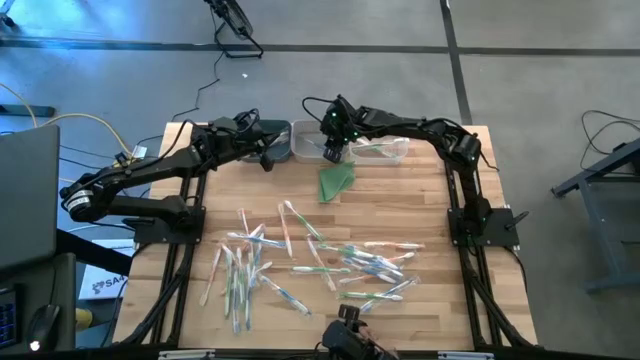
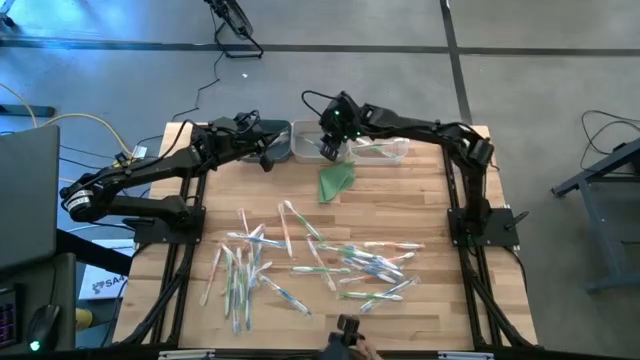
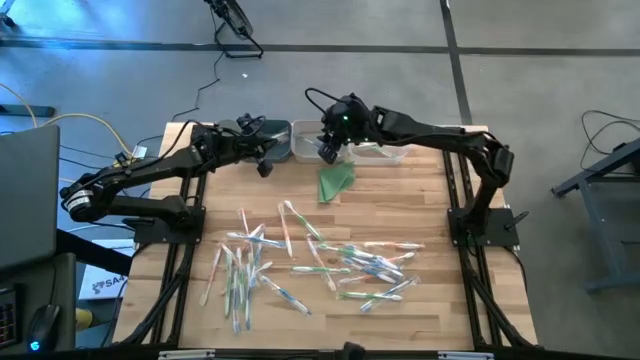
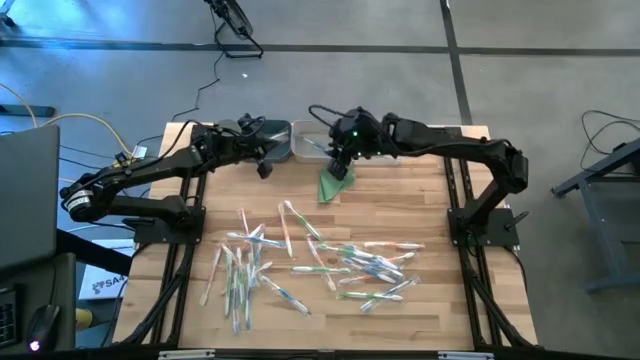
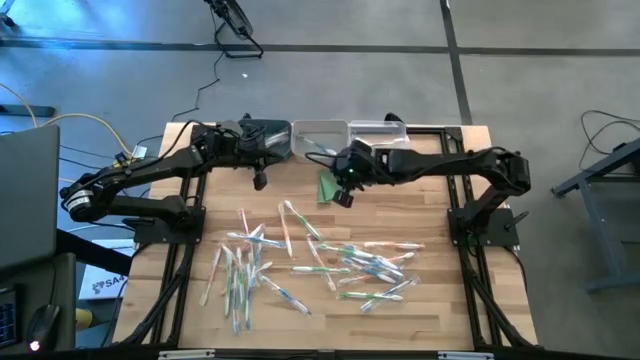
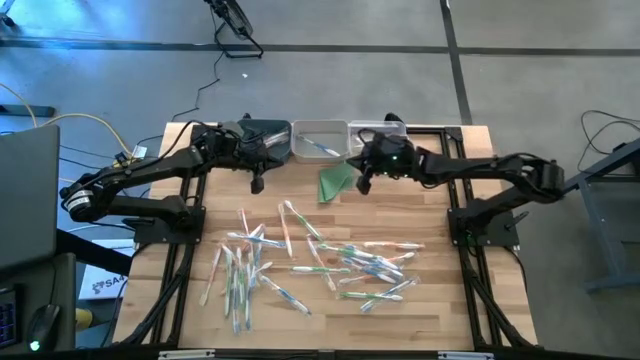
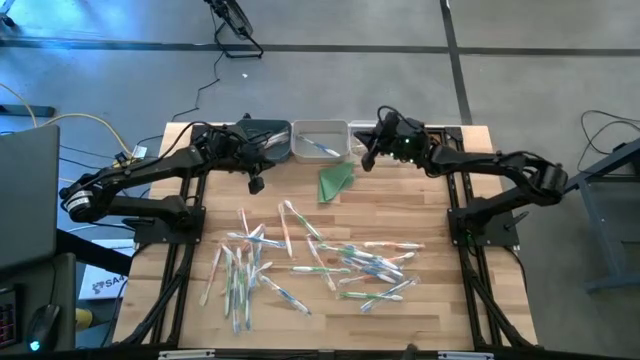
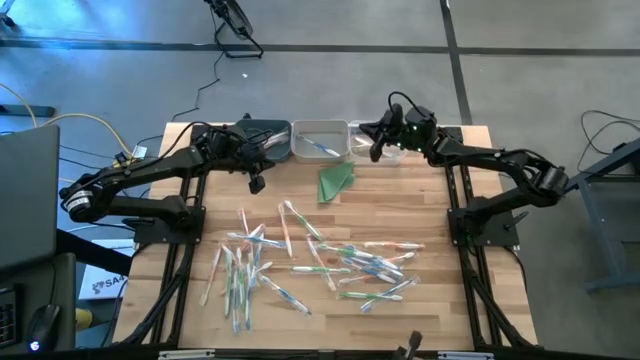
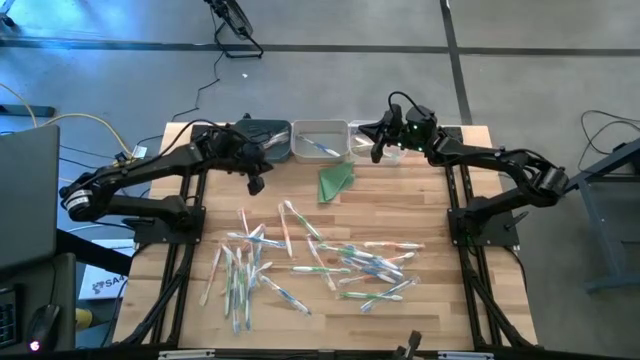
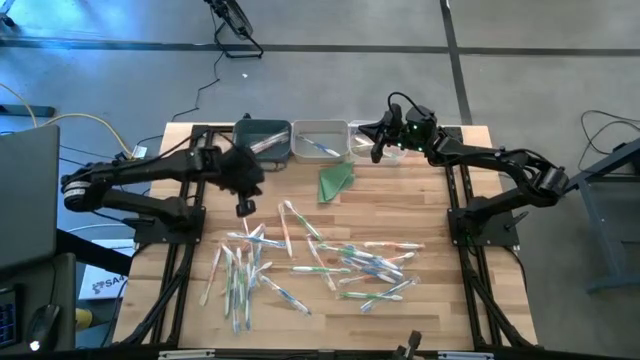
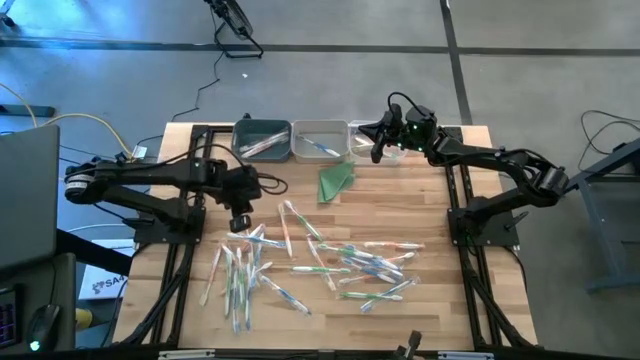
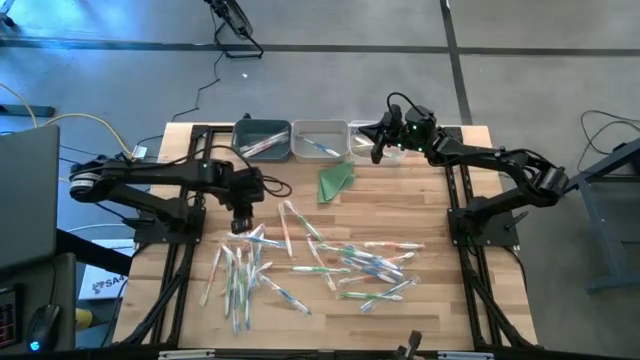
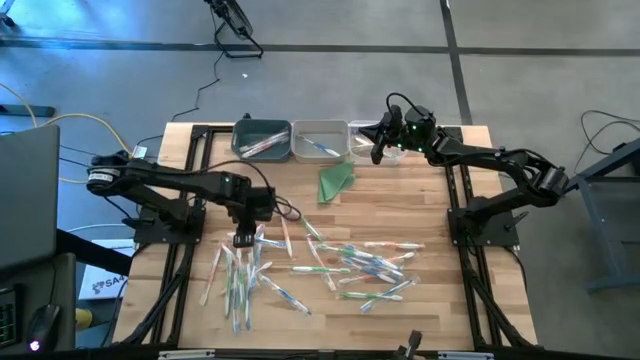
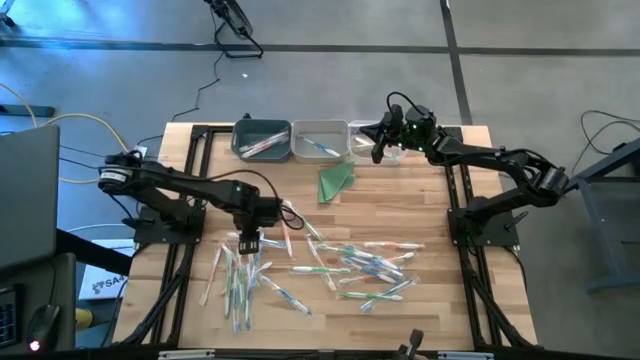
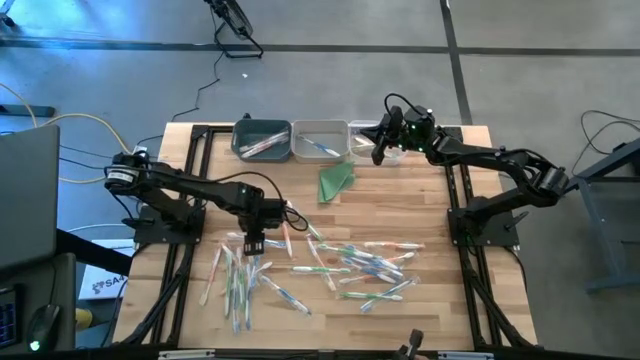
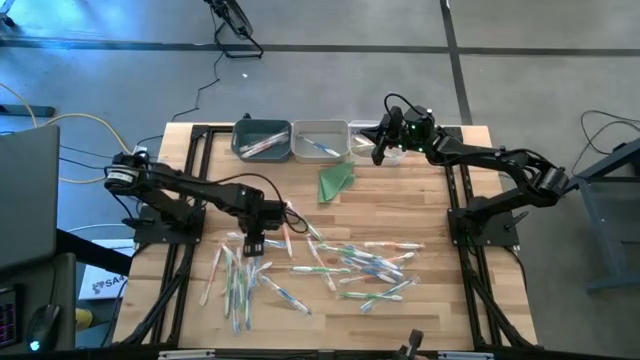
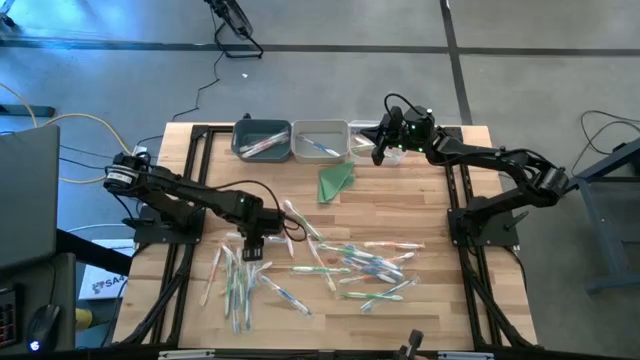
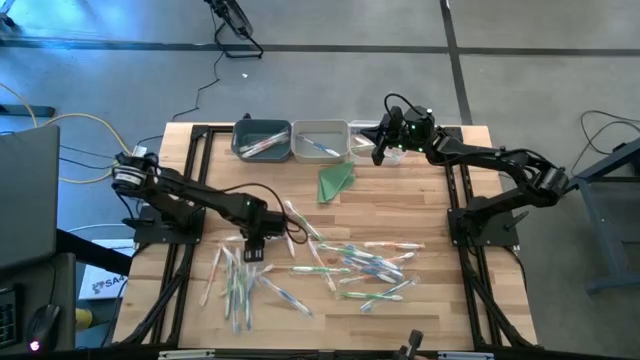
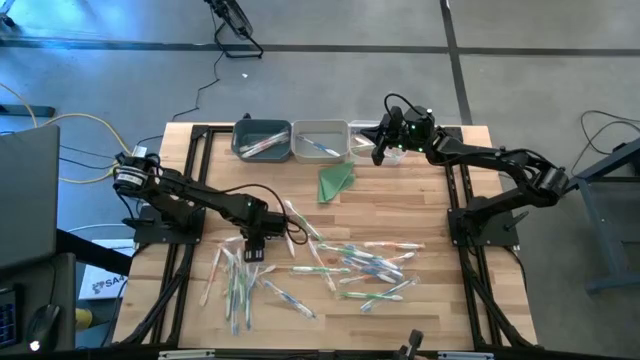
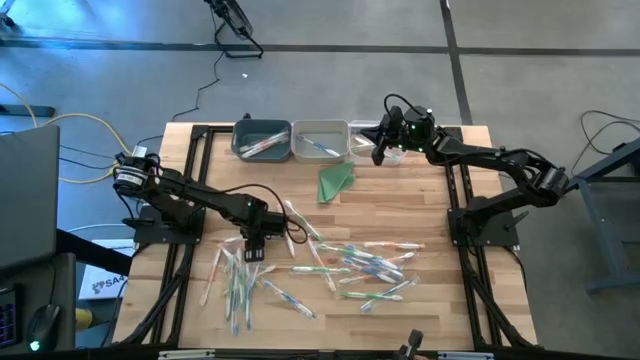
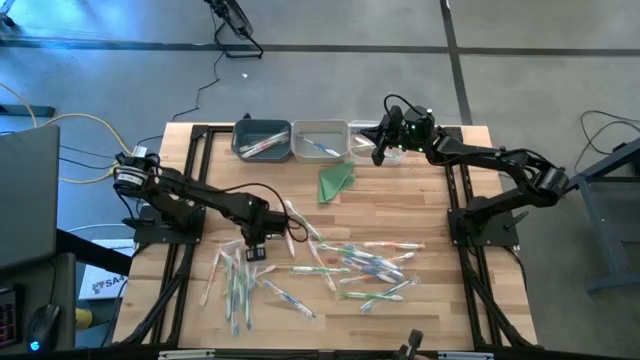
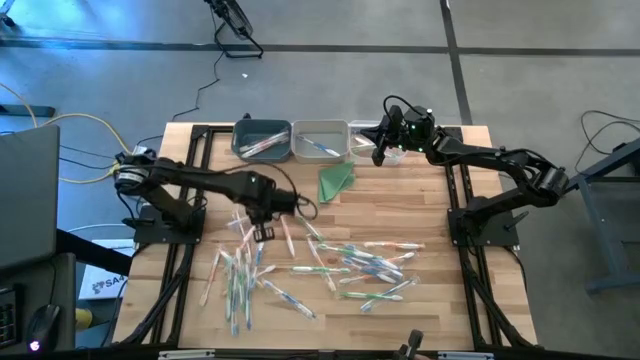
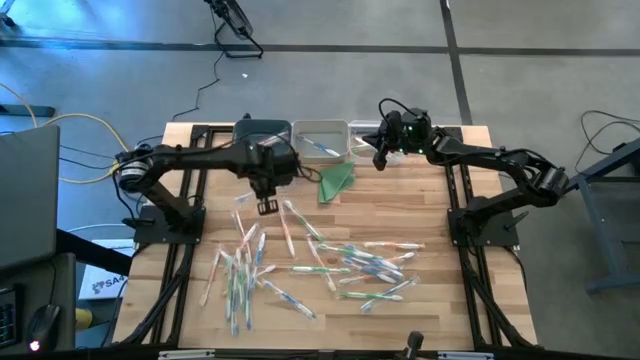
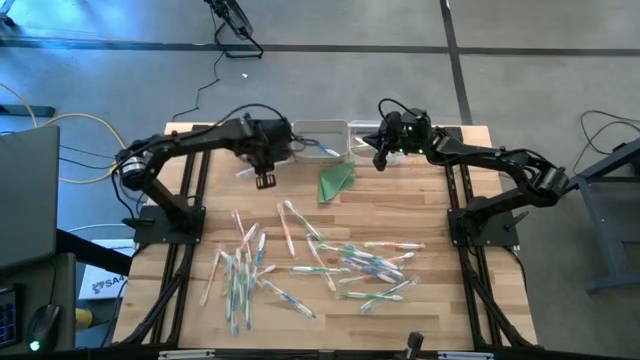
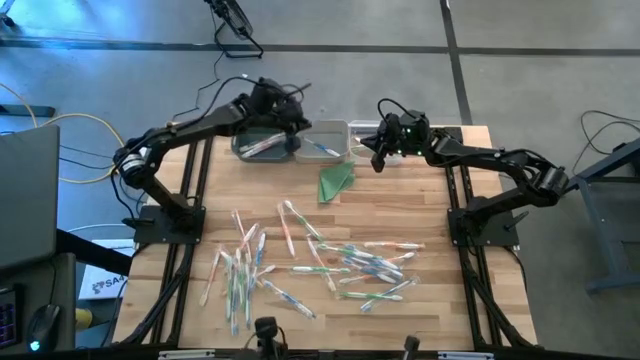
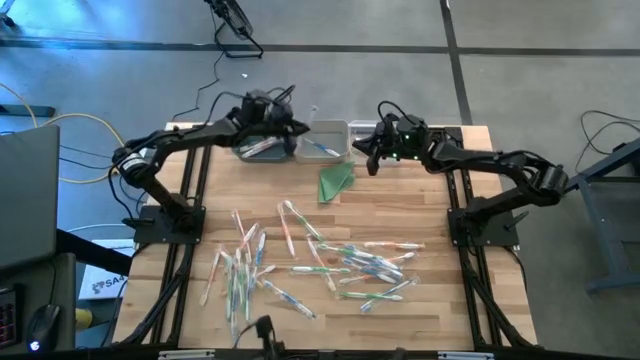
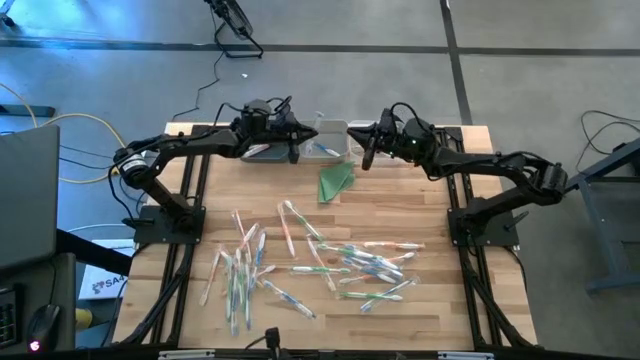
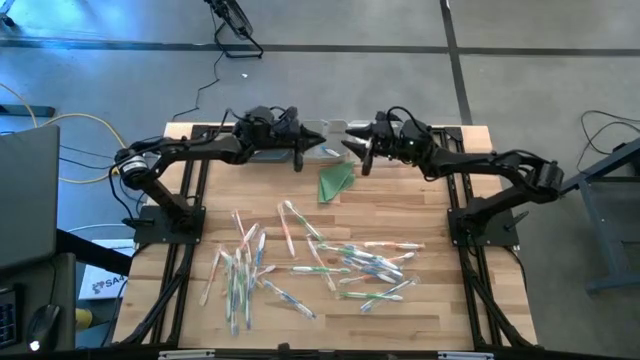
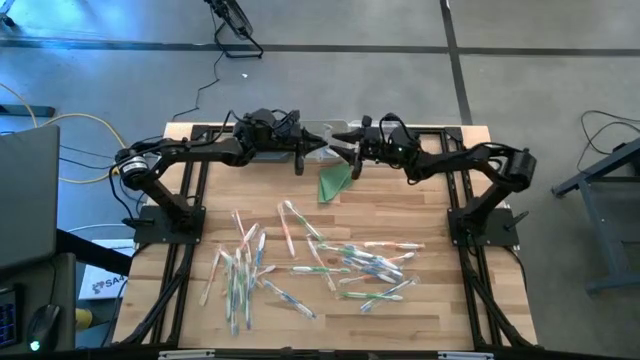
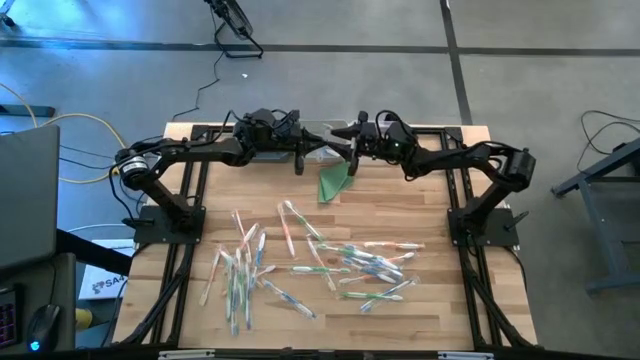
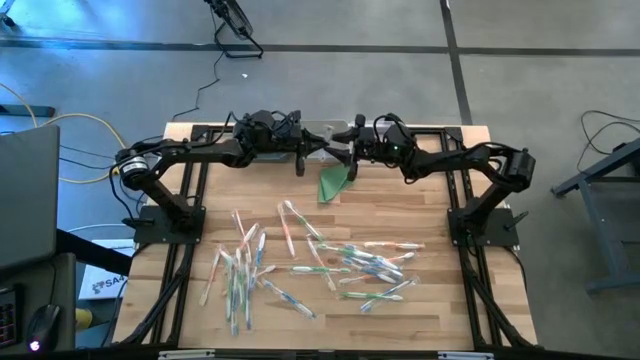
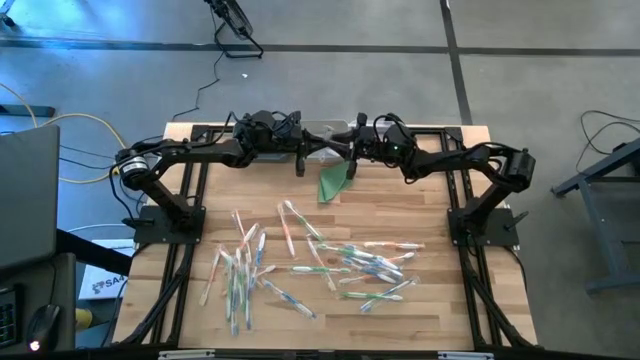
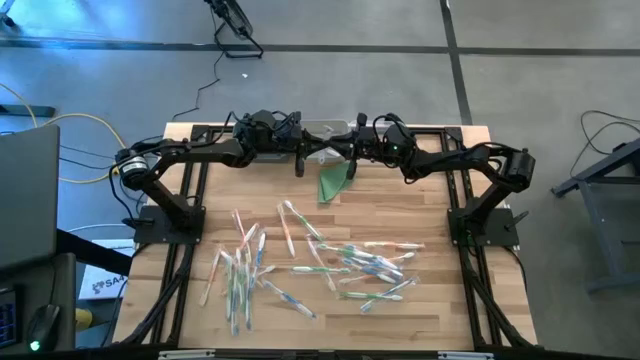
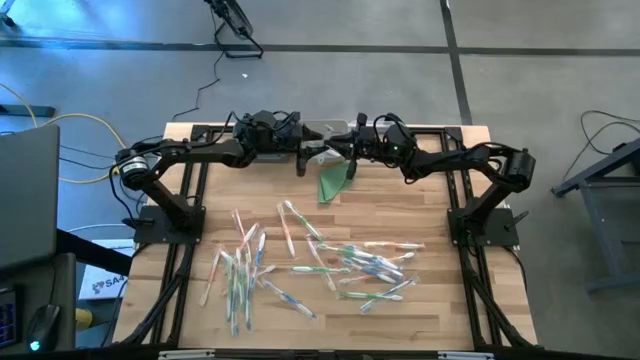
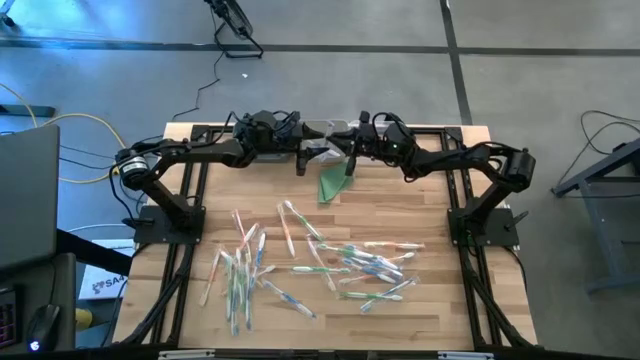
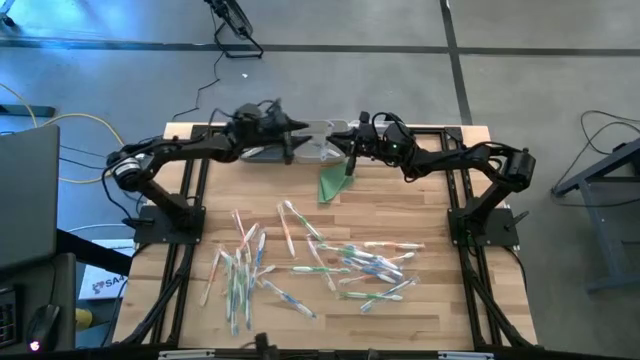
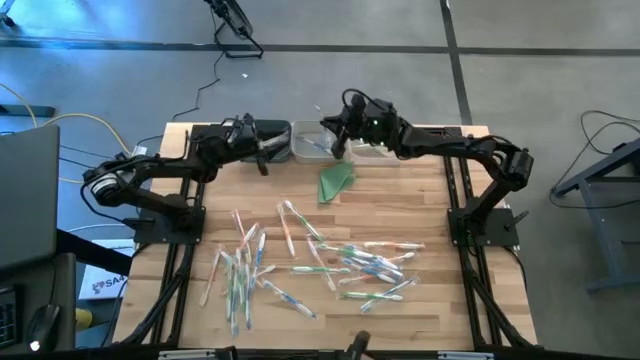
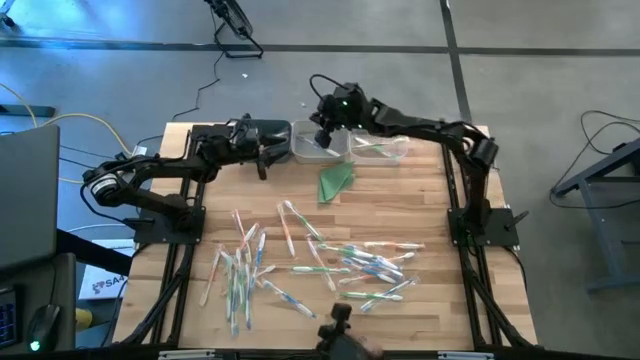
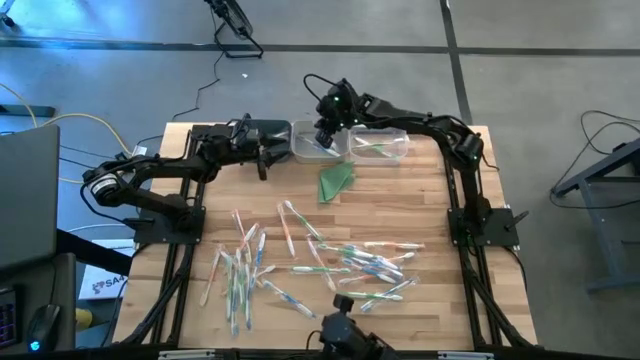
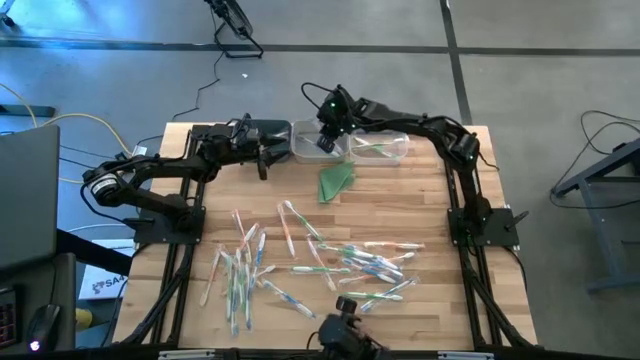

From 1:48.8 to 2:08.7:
Task: Pick & Place Toothbrushes
Put the blue toothbrush into the gray bin

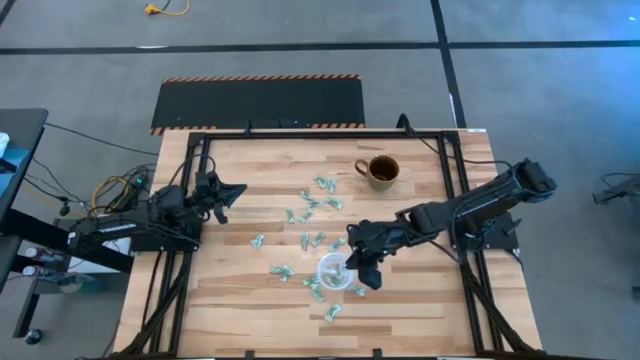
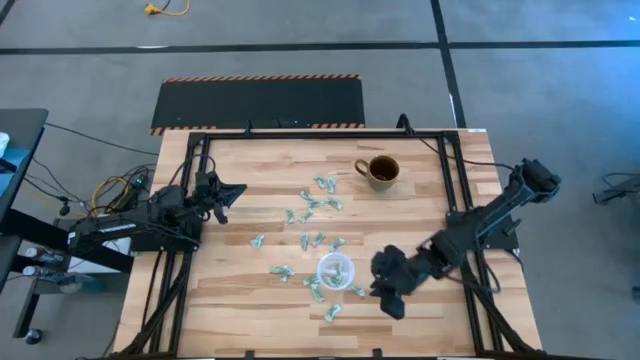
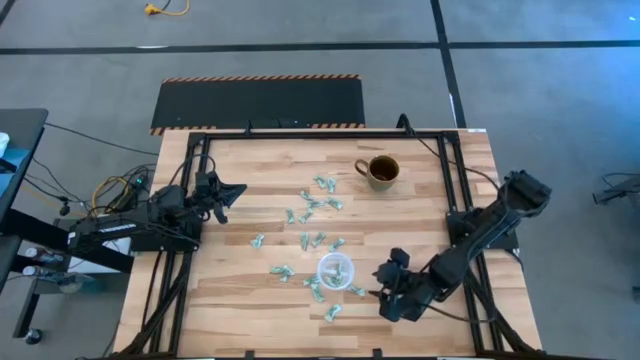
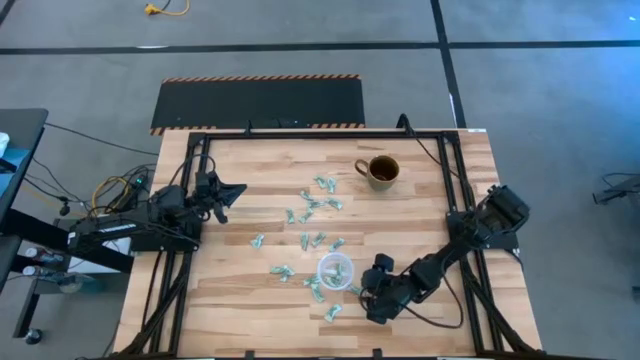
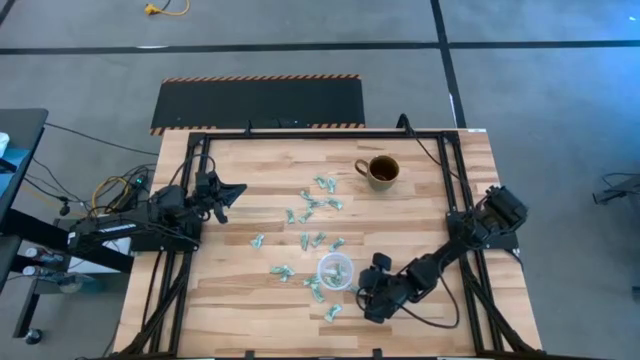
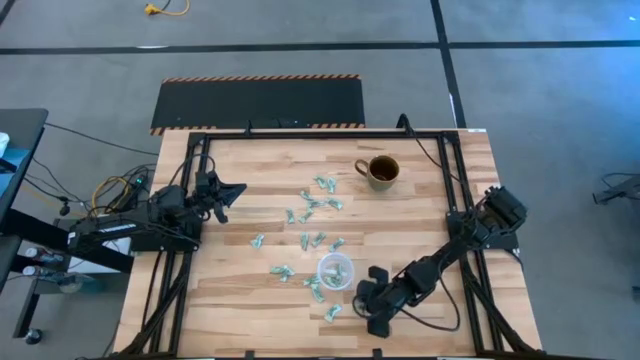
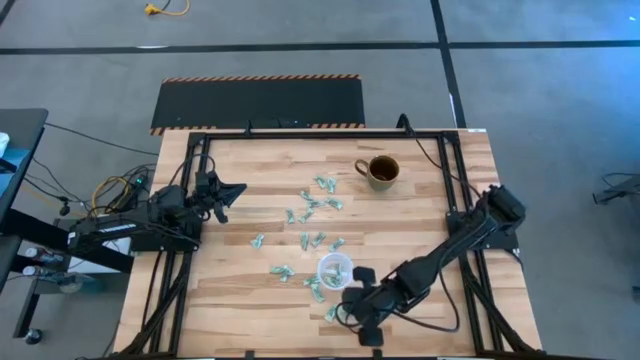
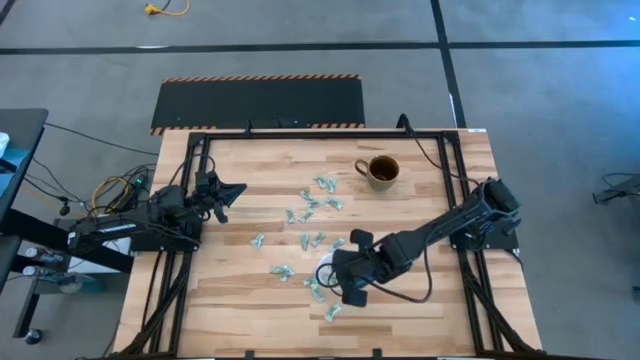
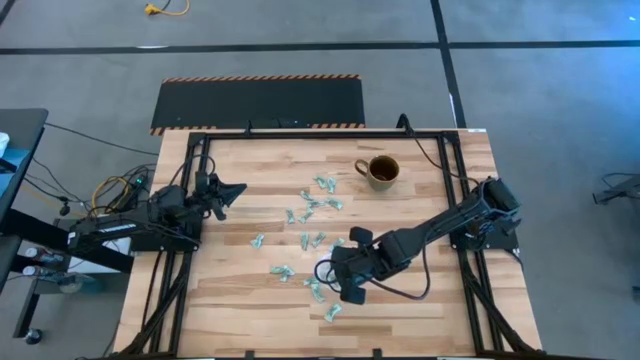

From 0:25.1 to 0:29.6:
Task: Pick and place Stevia / Truvia into bins
Put the green stevia packet into the transparent container
